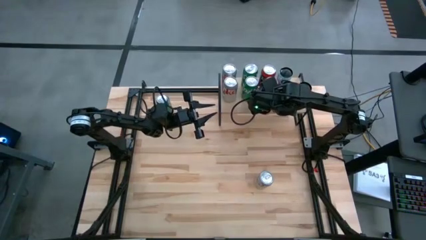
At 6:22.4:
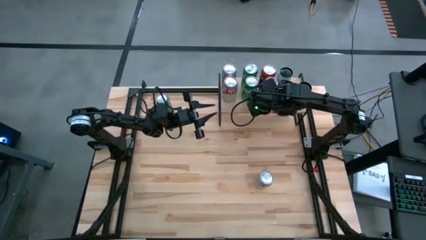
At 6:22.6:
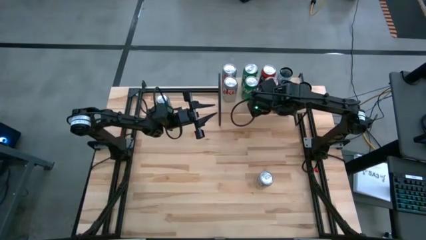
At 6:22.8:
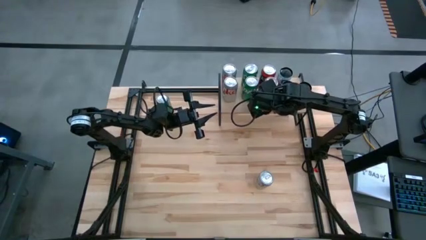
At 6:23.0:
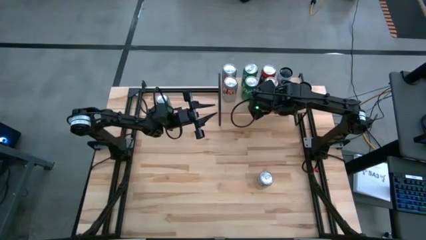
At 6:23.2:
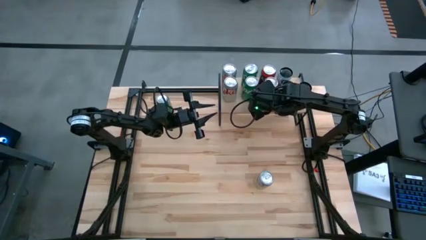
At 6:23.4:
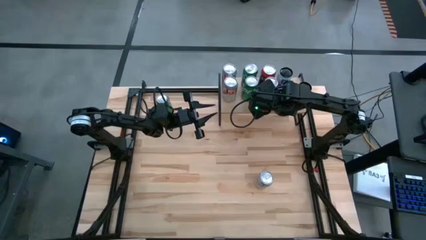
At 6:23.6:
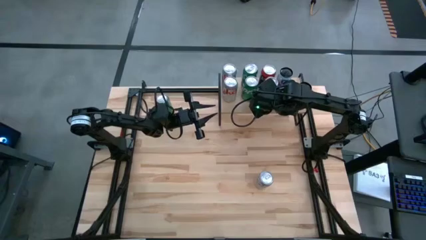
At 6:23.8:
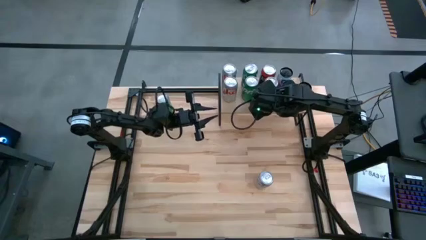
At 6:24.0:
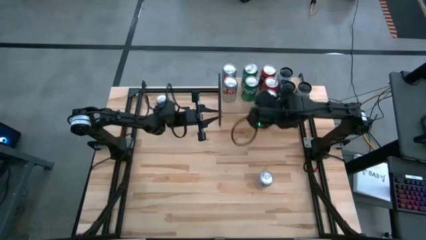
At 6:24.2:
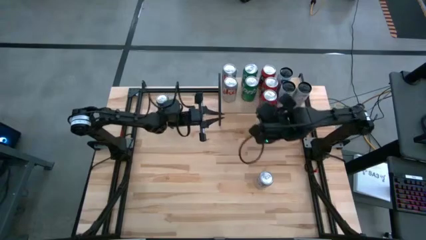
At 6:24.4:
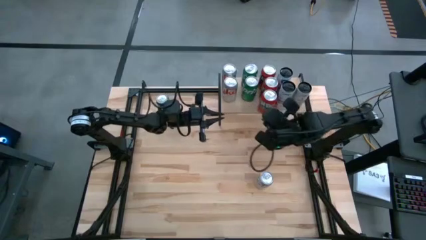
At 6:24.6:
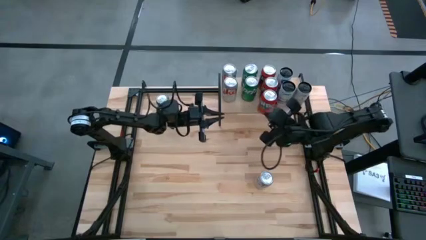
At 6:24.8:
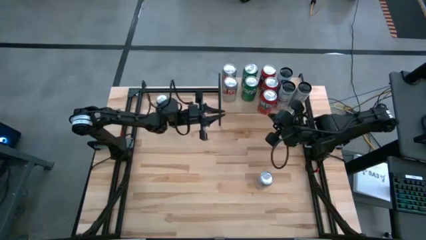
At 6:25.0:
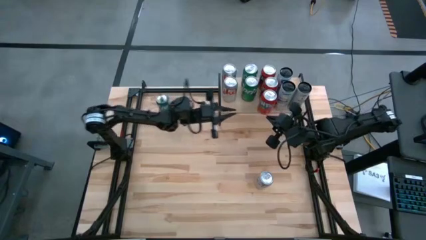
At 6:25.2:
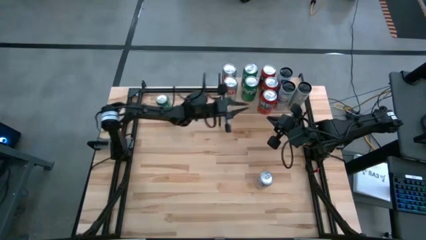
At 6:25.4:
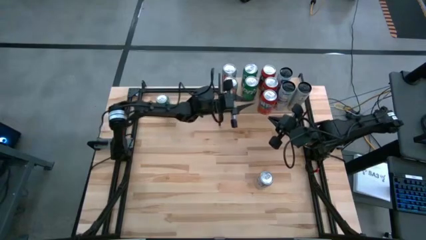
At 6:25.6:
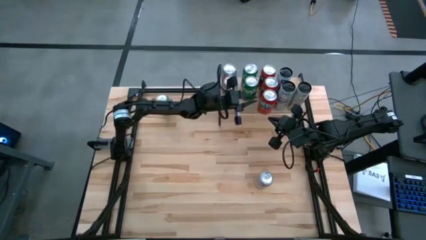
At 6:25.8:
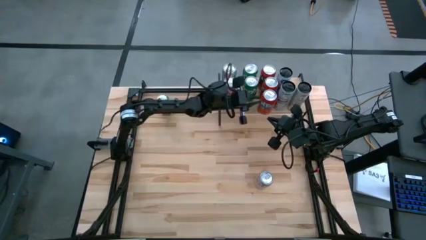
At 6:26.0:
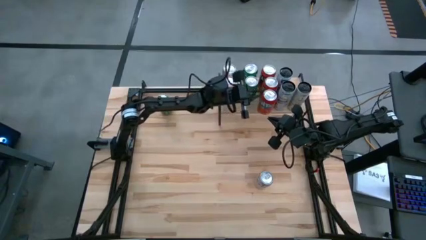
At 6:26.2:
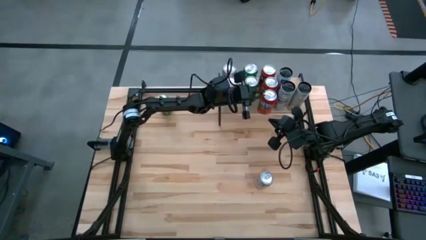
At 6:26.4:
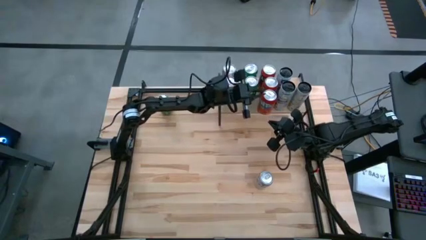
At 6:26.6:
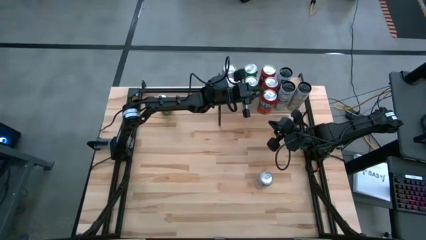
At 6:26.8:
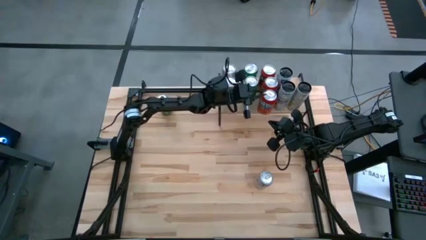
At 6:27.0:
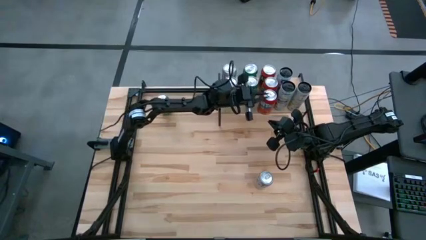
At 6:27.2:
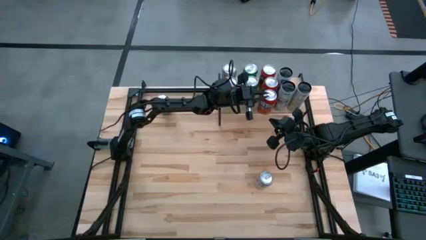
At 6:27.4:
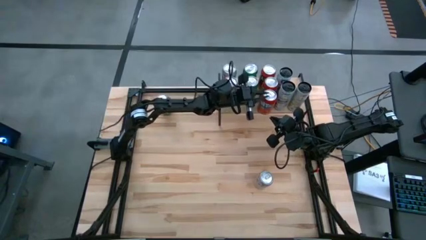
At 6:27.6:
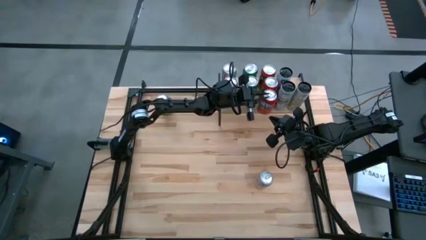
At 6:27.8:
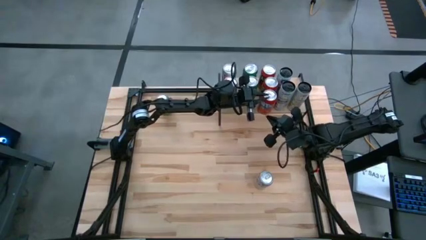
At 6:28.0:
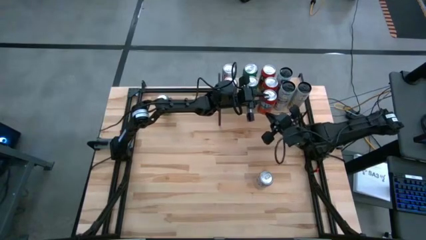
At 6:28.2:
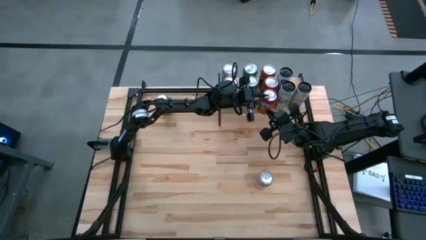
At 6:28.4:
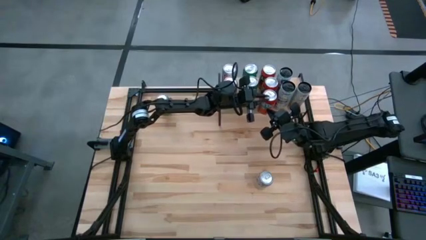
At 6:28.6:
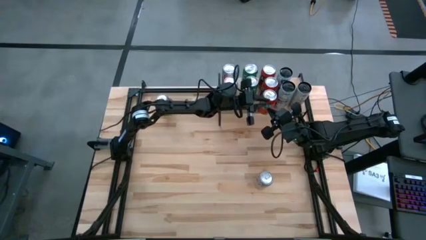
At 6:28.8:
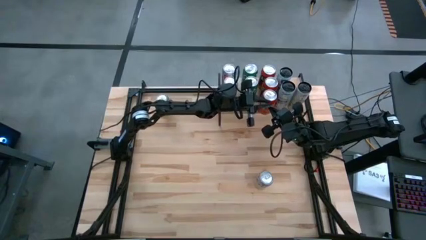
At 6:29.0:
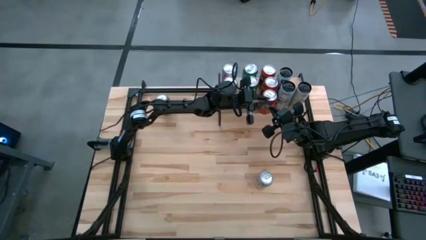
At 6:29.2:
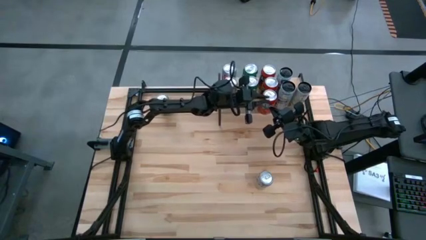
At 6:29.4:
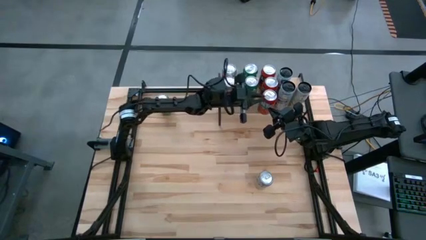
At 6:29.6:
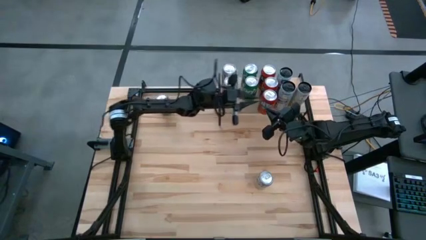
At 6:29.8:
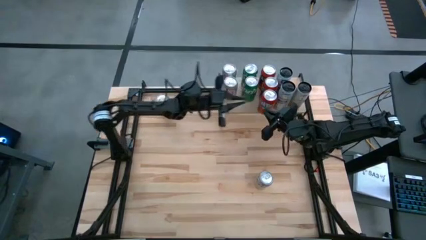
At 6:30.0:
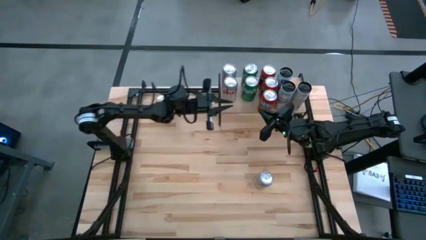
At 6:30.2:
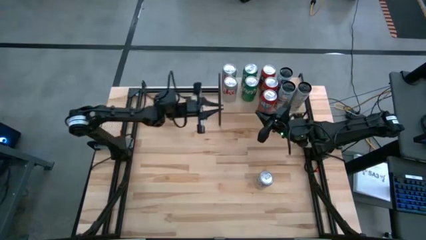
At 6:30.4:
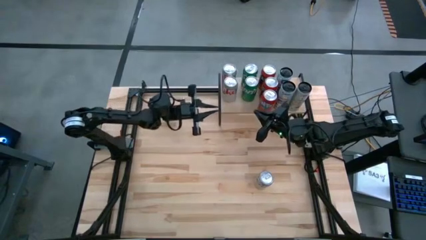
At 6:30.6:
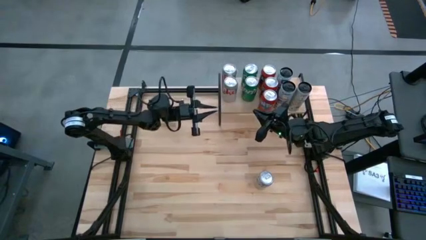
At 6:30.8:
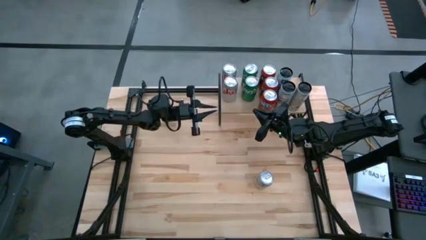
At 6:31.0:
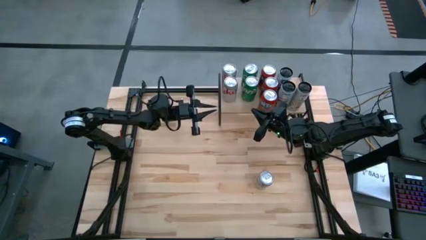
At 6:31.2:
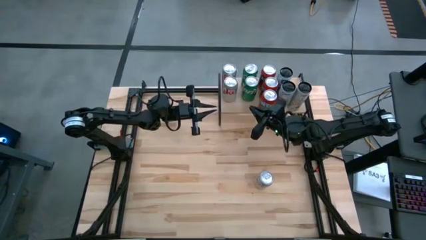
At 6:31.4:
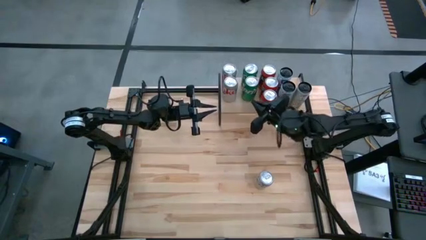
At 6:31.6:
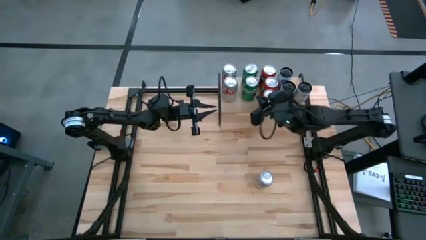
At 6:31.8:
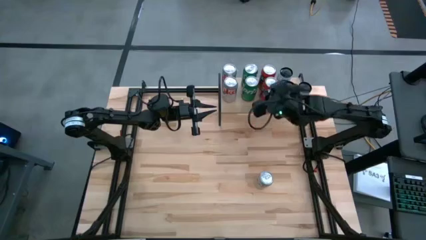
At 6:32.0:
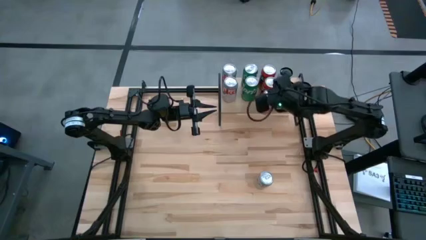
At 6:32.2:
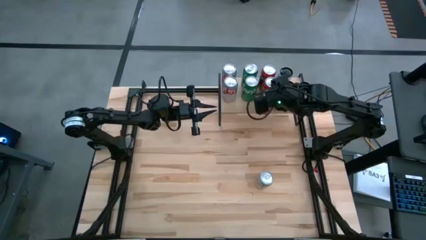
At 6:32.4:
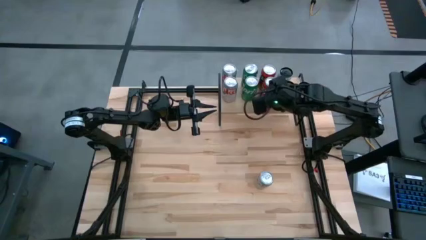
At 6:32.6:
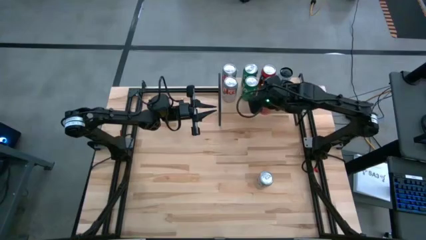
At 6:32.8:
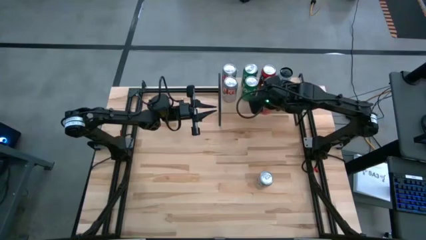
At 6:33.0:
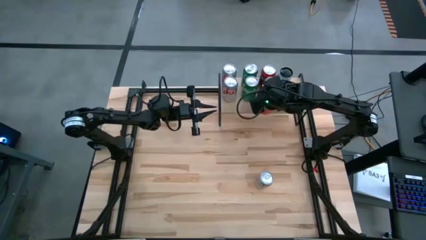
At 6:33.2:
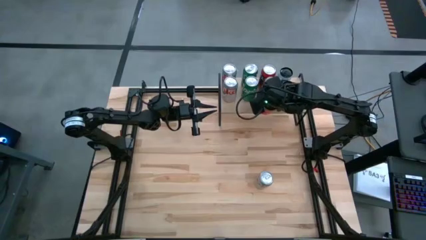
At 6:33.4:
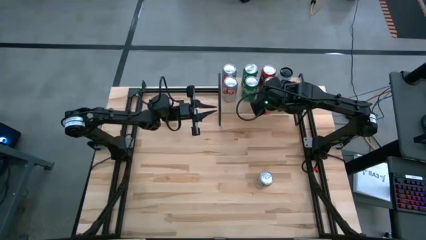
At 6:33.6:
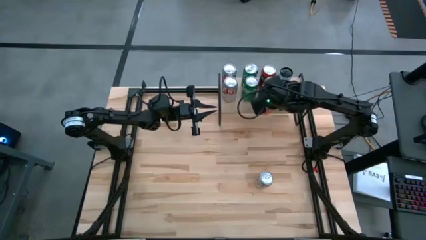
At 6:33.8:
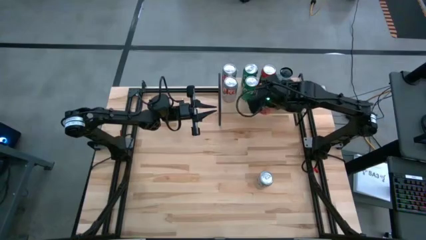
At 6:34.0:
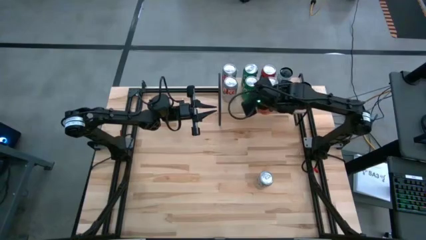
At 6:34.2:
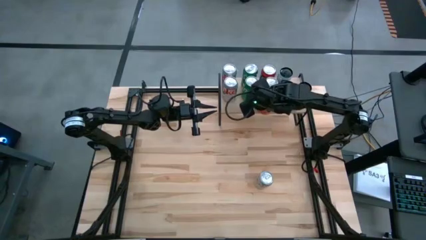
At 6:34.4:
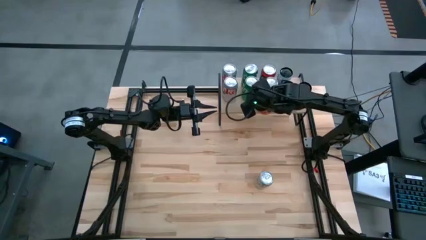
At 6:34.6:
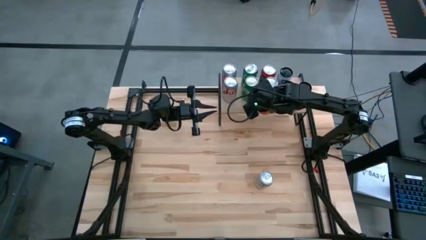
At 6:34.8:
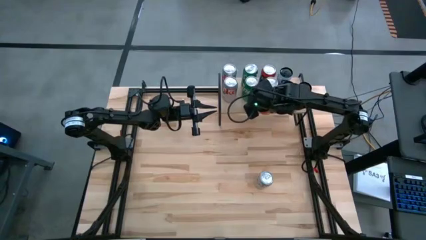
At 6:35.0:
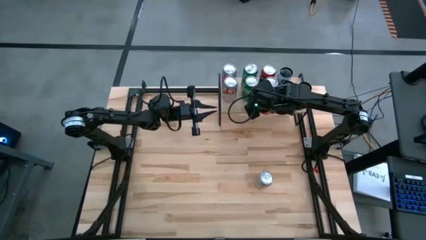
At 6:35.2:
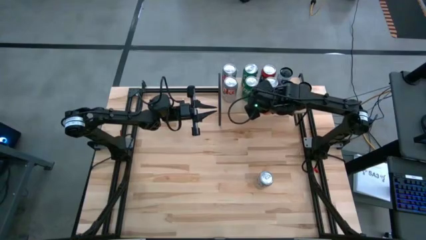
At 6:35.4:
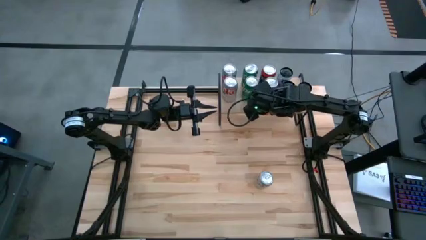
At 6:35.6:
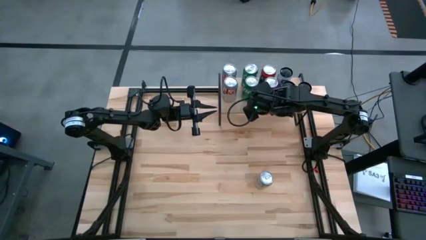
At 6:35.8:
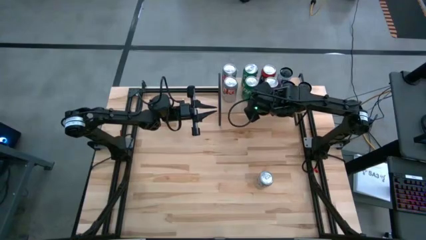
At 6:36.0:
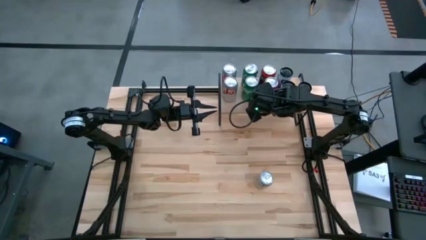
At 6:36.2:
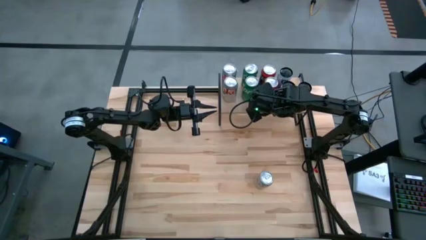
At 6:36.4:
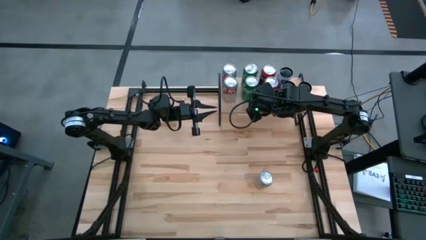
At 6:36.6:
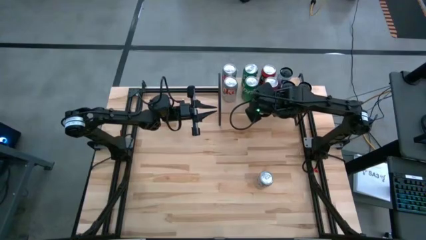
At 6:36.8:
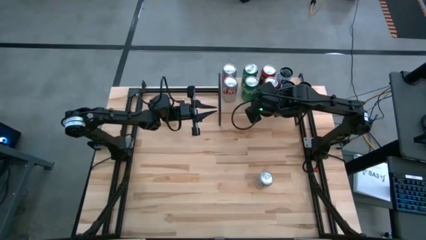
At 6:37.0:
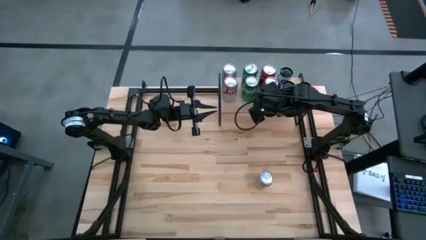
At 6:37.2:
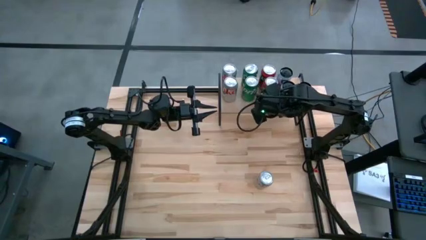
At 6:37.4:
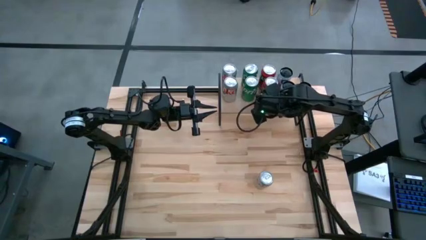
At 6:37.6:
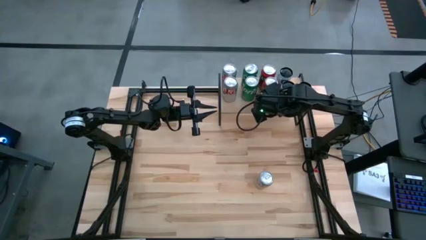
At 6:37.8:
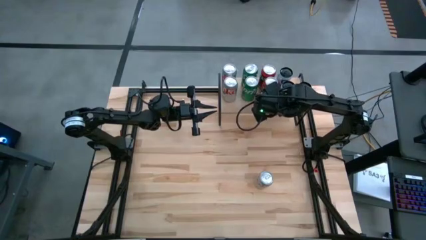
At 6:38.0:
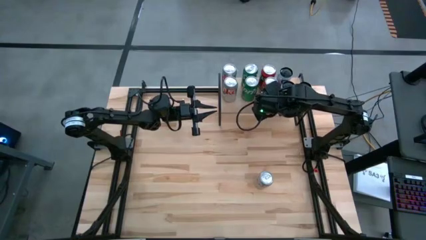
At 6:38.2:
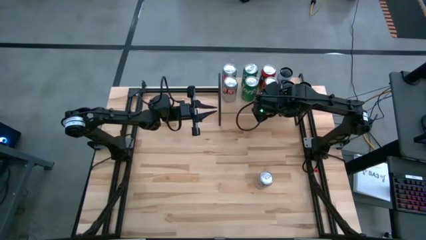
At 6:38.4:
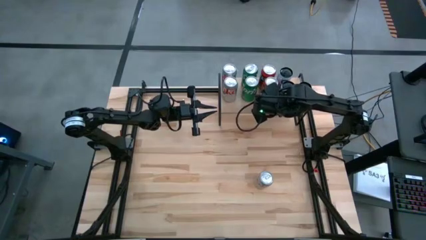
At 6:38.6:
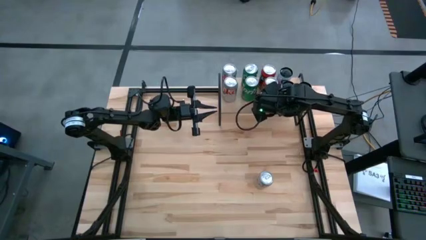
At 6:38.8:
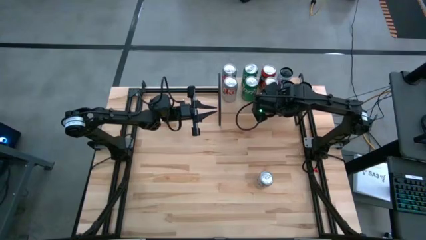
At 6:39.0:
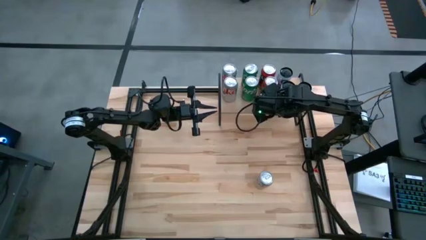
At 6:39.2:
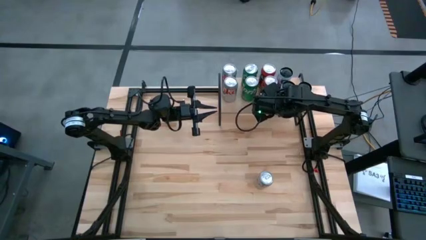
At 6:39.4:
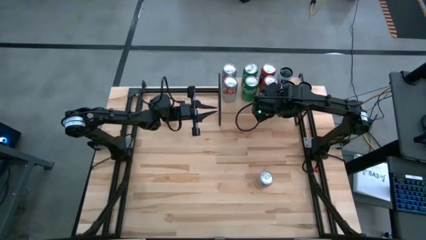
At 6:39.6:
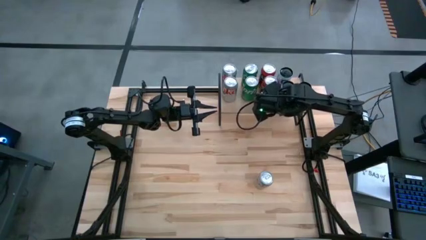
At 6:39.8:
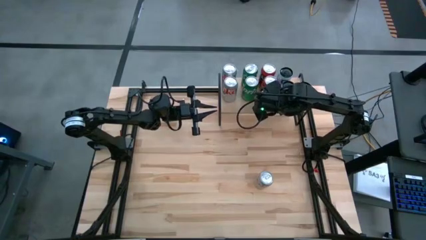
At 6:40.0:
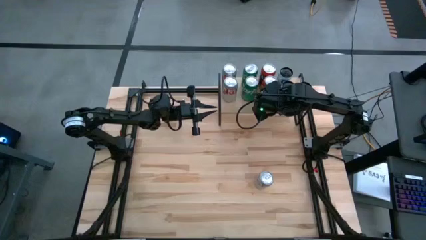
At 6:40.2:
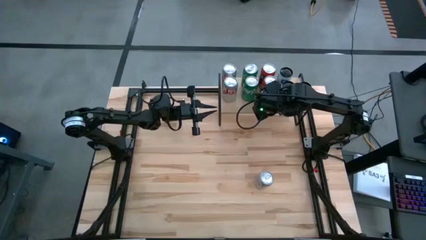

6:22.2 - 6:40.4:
Task: Place canned beverage on shelf
Put the orange soda can on the shelf aligned in front of the other orange soda can
